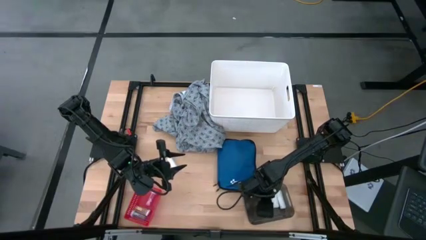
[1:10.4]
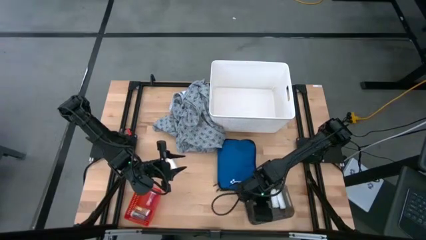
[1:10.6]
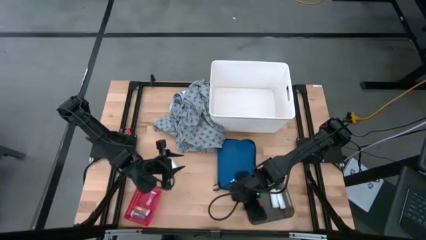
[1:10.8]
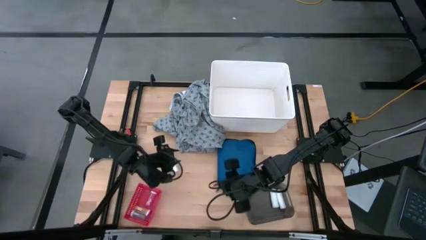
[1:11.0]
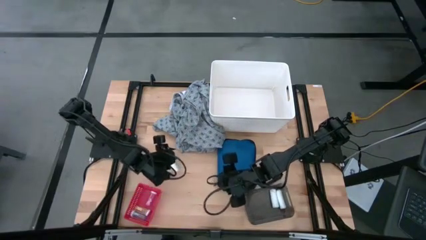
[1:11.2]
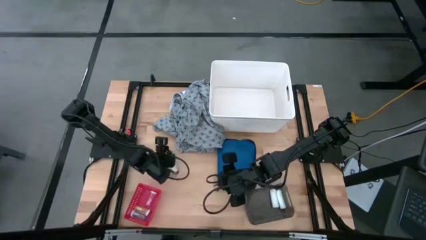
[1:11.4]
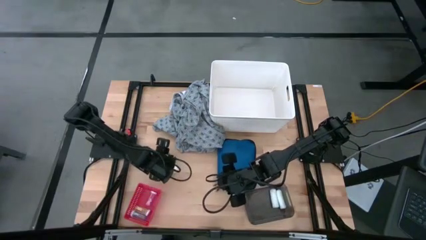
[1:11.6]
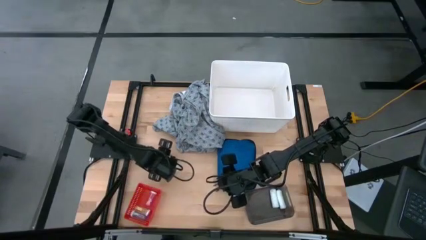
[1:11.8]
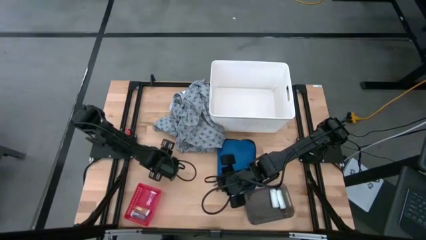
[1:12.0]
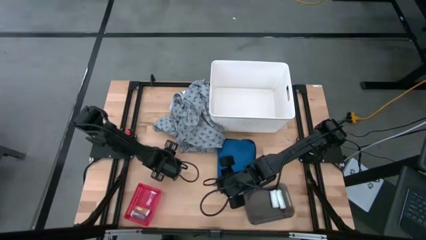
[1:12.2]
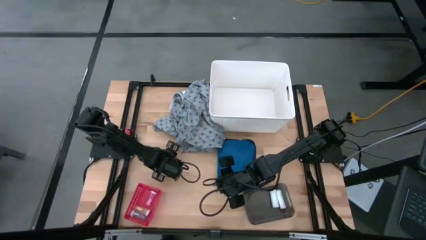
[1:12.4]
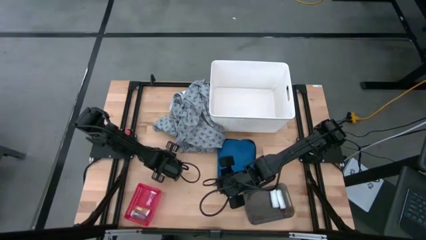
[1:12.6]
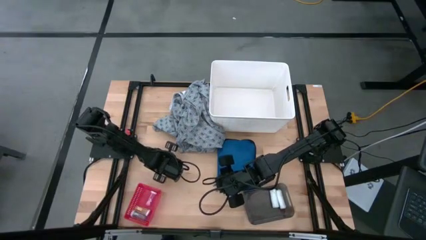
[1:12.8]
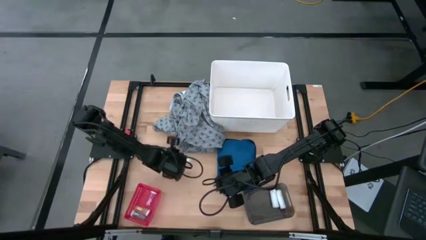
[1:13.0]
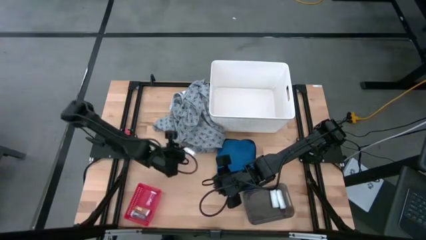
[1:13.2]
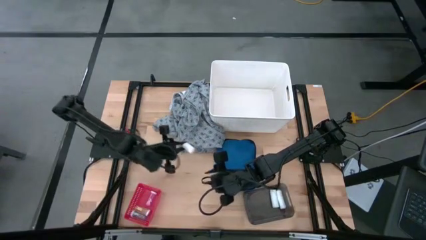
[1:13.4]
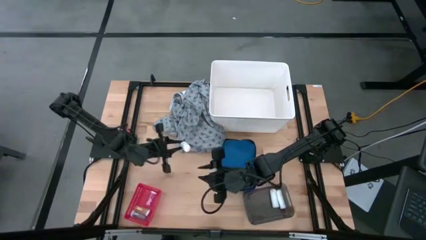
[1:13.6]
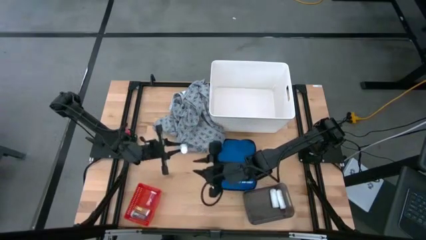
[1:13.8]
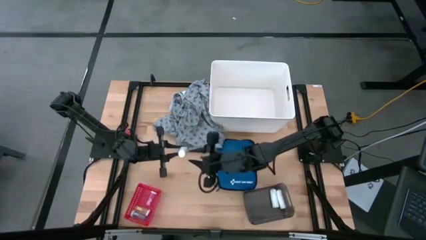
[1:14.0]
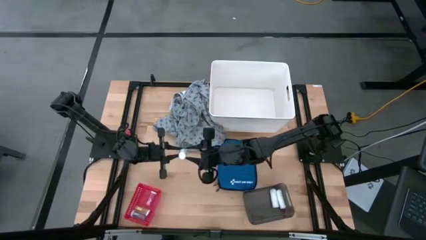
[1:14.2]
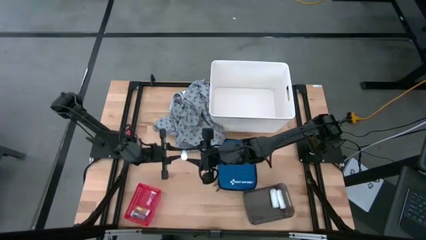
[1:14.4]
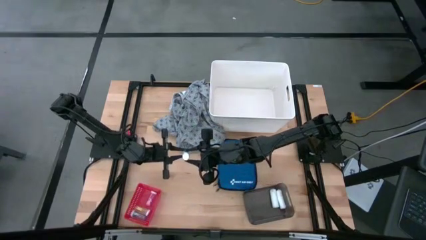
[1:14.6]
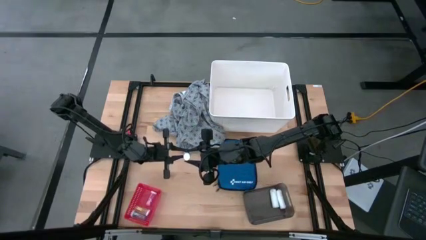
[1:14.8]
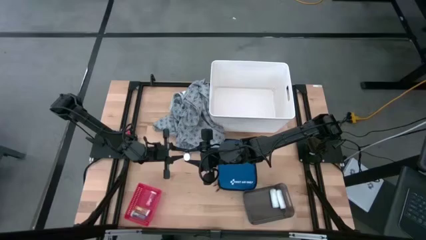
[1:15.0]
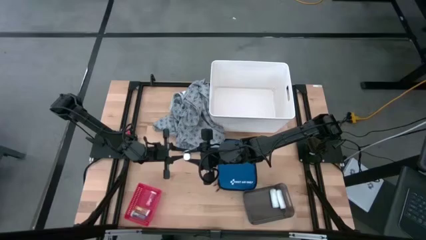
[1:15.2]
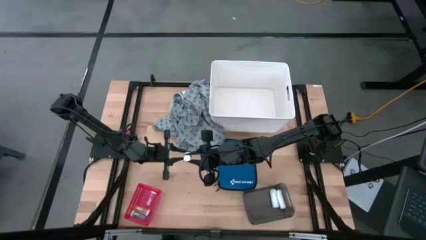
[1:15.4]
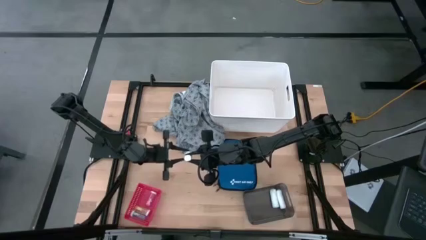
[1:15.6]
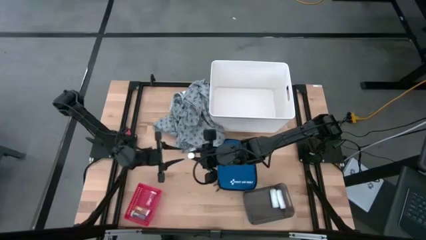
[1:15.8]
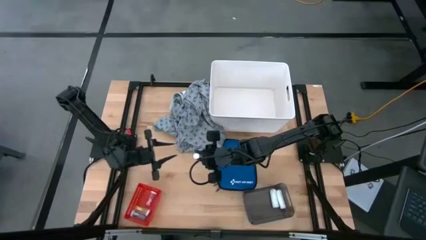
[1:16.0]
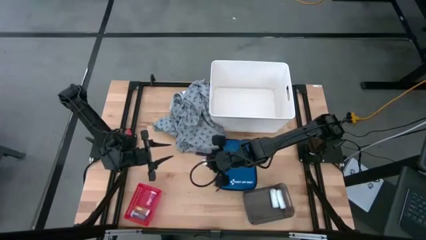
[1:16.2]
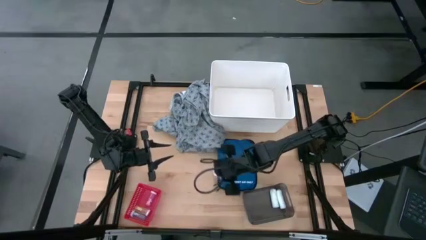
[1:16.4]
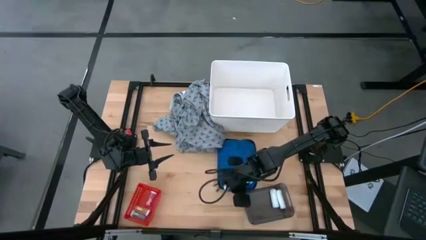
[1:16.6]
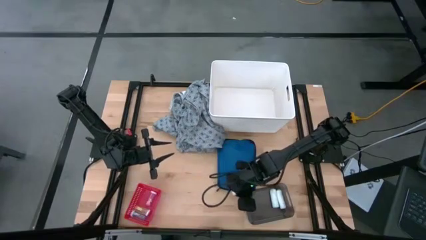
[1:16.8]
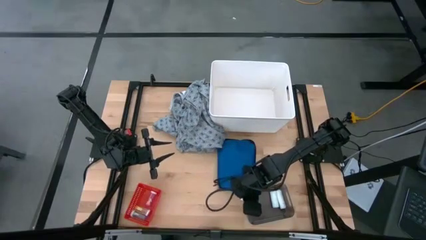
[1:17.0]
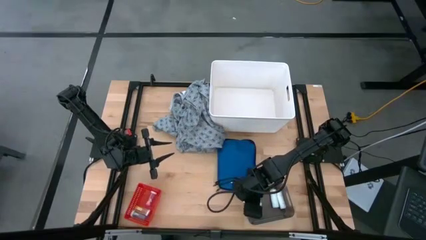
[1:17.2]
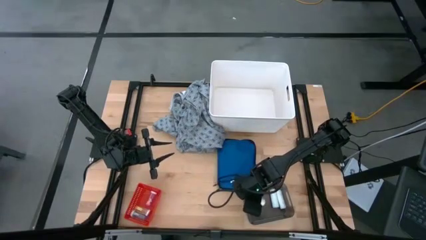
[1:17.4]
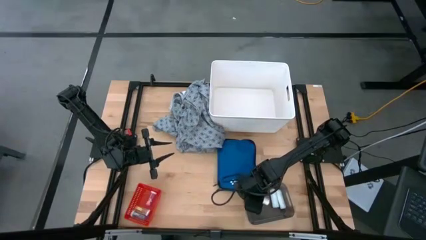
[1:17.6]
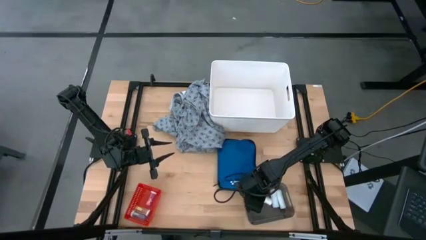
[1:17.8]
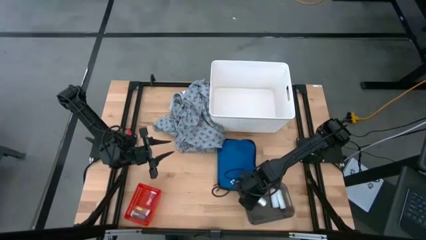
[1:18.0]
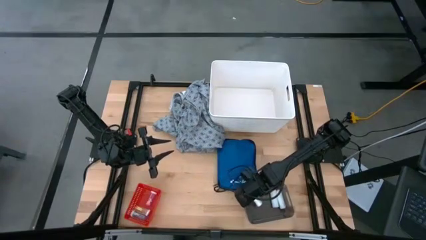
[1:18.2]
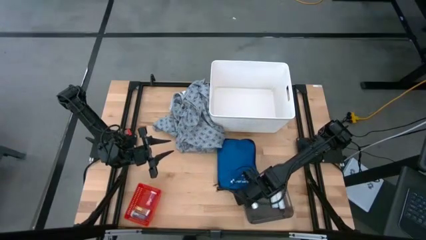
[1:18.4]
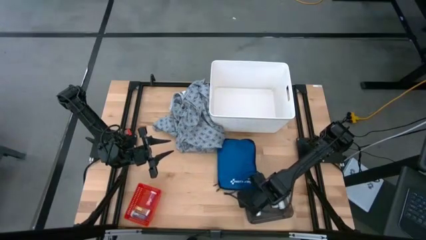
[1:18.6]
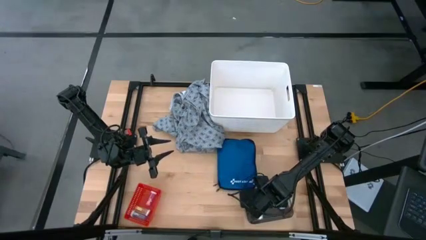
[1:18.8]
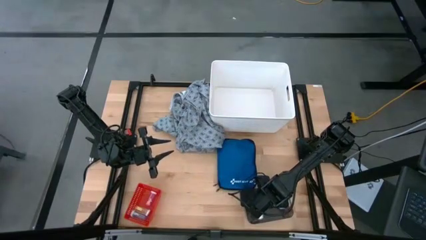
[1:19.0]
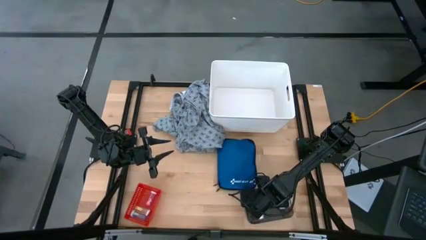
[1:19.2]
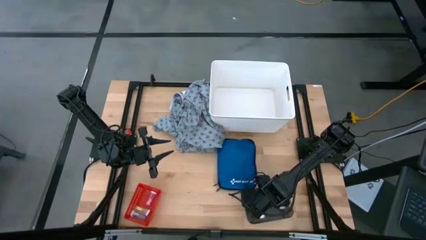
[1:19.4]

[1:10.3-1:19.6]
Task: Pick & Place Medicine items
Put the white rolled gauze into the black bin

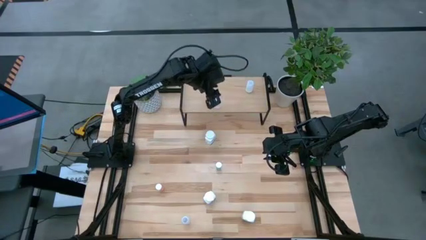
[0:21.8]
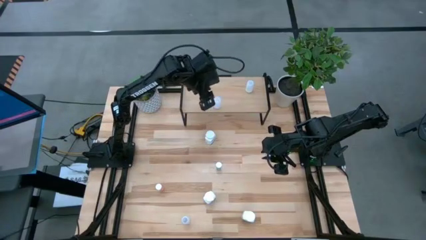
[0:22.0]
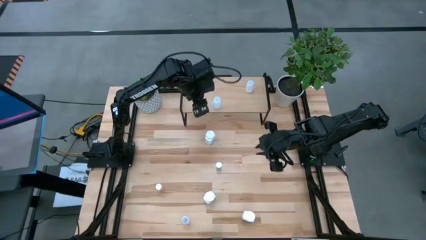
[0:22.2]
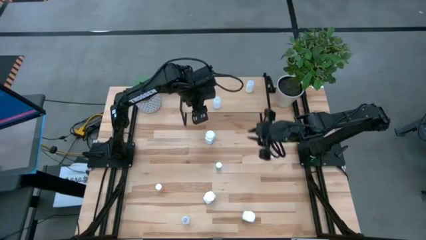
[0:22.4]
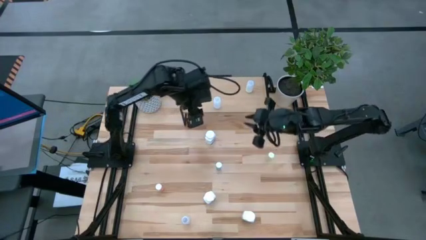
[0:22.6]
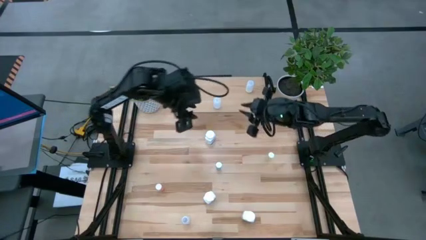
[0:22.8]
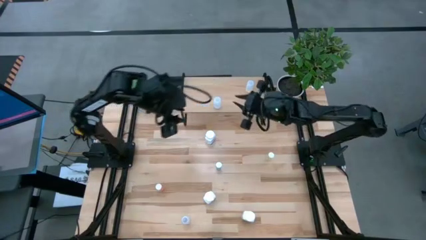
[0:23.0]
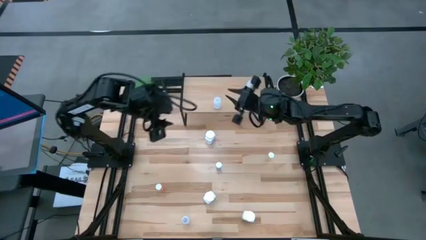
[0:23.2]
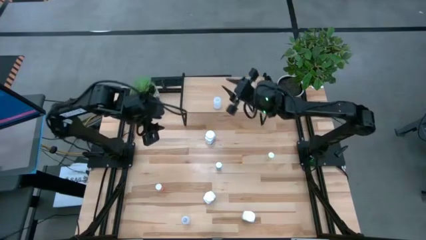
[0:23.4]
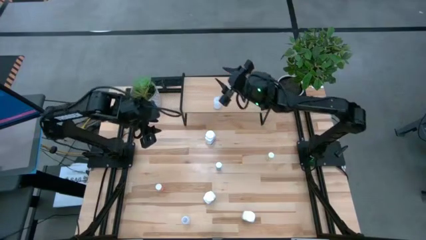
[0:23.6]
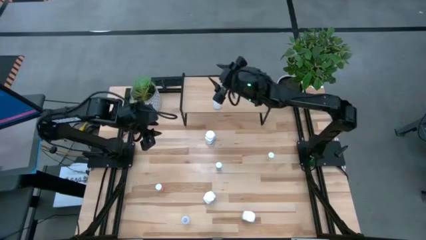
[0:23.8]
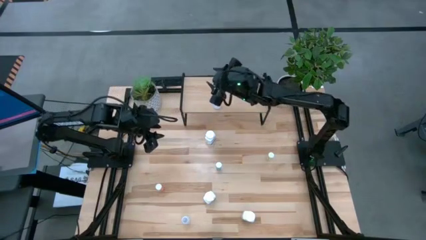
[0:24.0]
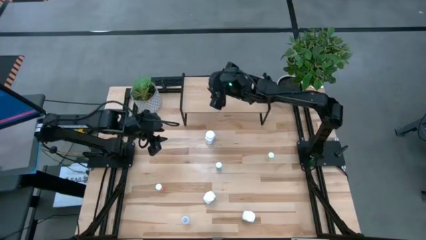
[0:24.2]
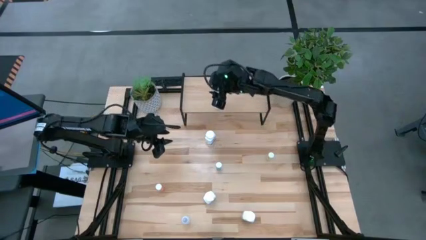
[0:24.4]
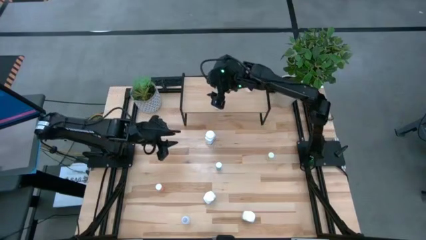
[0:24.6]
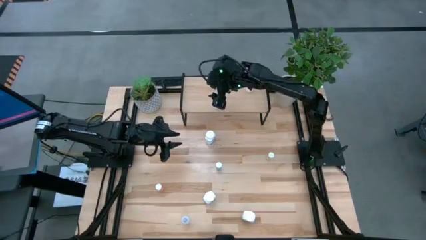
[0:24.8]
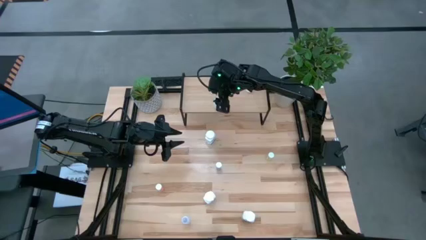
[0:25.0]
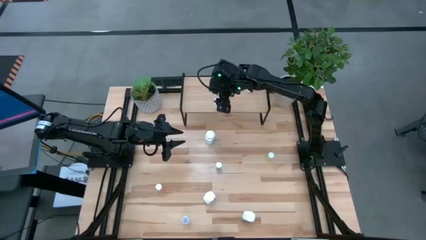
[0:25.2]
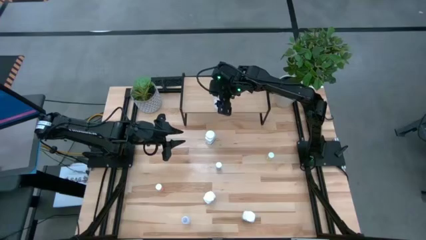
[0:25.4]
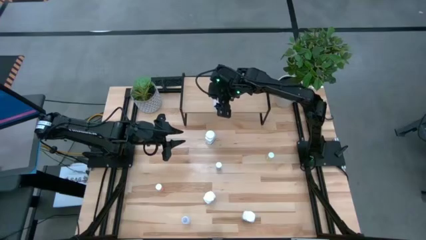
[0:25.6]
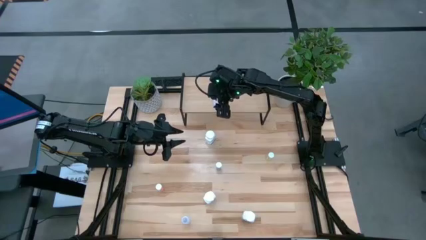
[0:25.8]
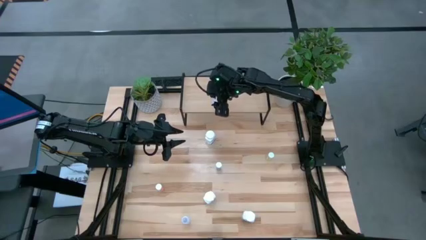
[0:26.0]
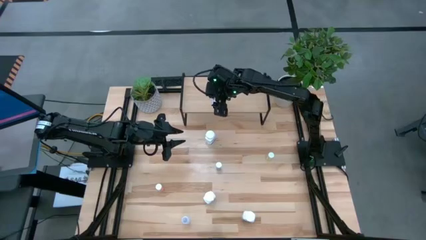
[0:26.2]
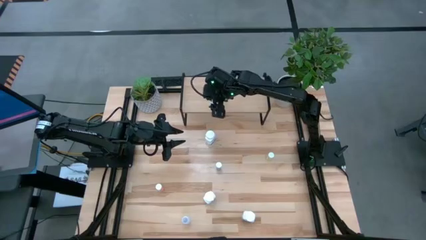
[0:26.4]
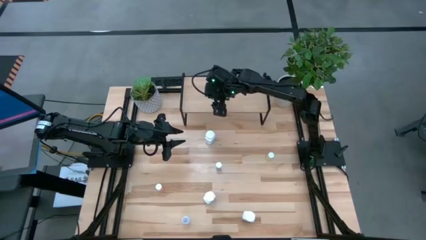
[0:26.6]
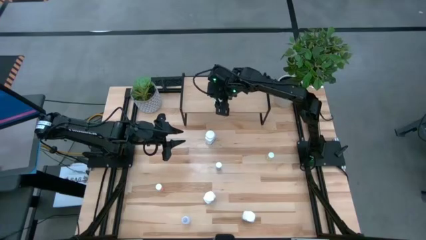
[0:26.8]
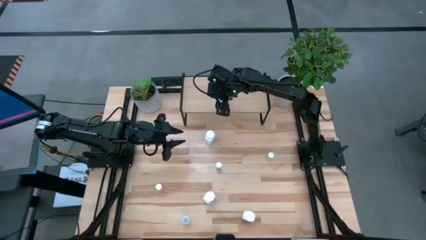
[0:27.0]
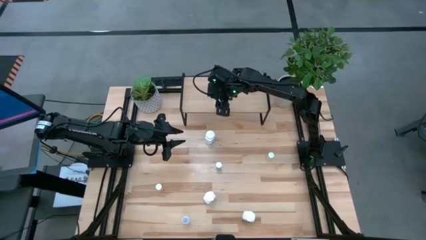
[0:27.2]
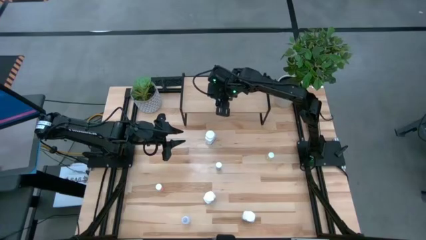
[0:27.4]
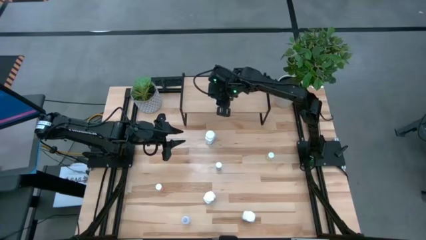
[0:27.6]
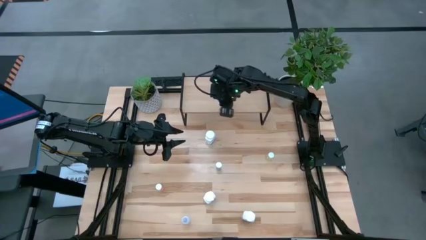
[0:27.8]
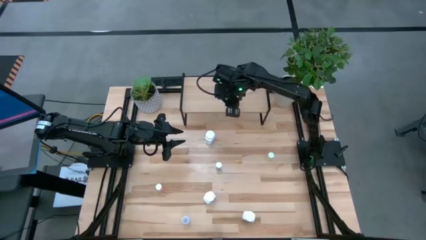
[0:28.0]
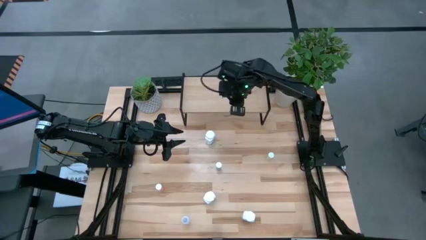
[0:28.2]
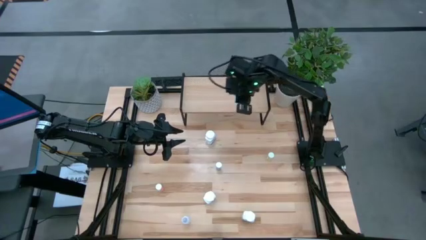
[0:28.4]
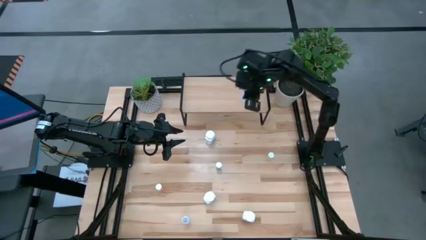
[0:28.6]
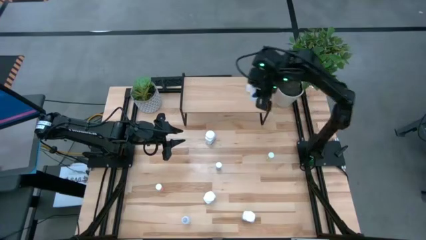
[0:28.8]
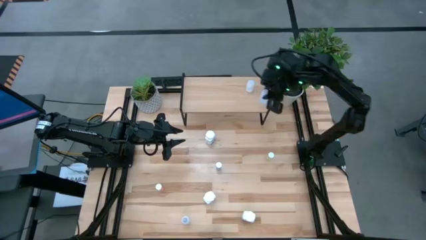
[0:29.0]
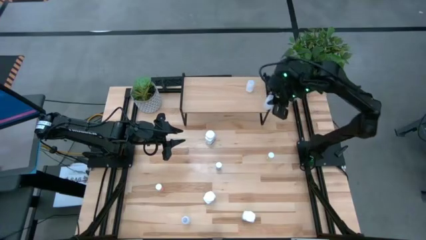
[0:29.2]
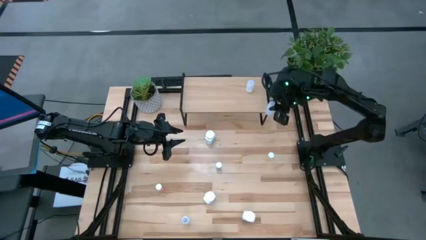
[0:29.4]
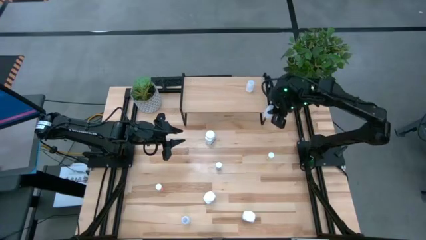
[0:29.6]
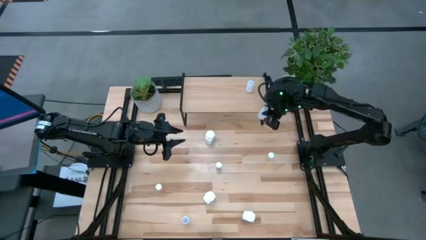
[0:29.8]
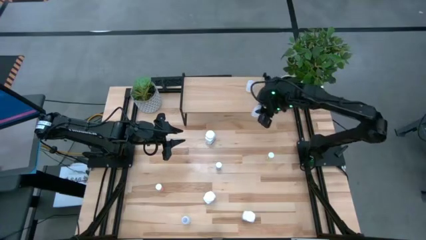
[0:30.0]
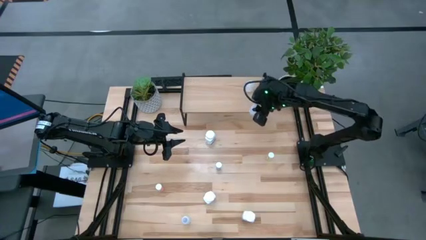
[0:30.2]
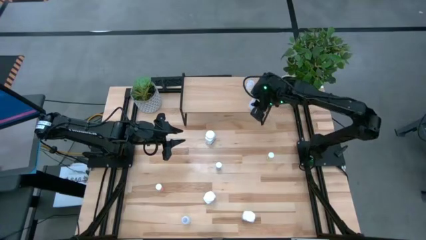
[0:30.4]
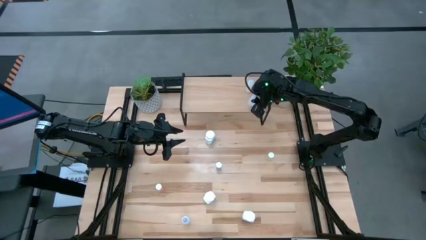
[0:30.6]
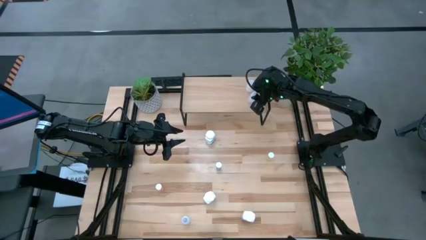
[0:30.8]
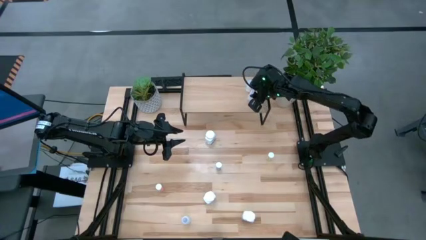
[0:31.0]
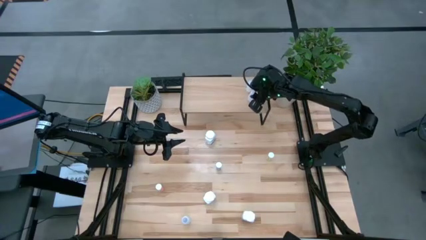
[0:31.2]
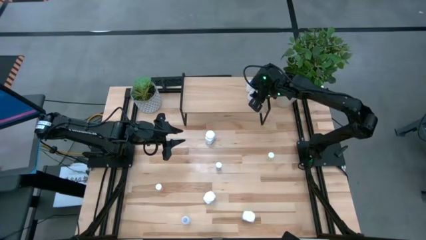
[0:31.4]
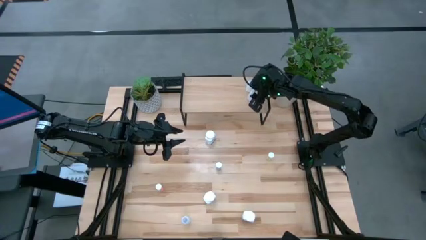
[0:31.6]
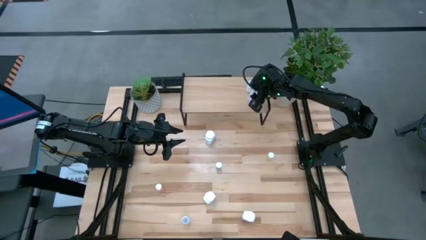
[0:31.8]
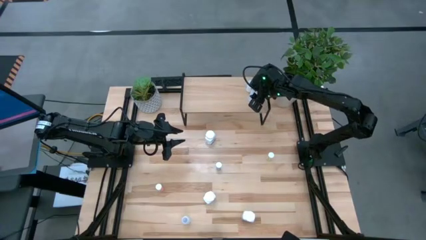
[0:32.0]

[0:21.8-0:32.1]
Task: Pick and place medicine bottles onto shelf by color
Put the top white pill bottle on the shelf
